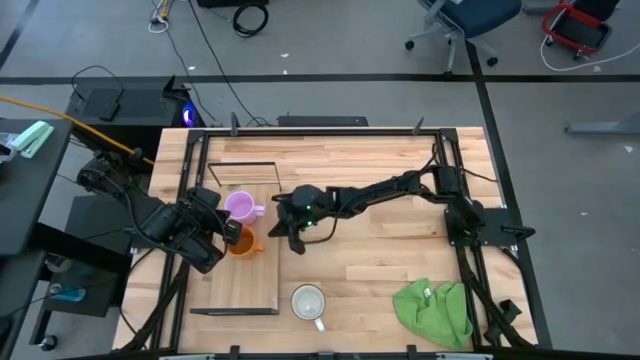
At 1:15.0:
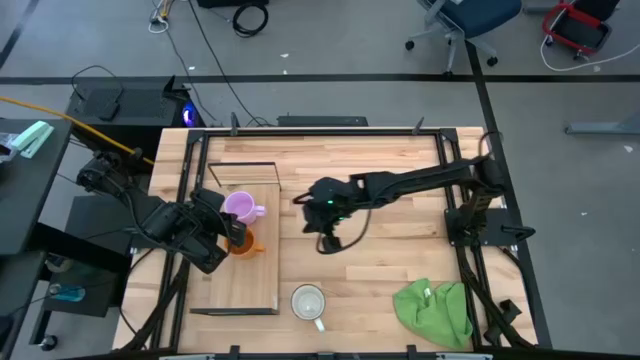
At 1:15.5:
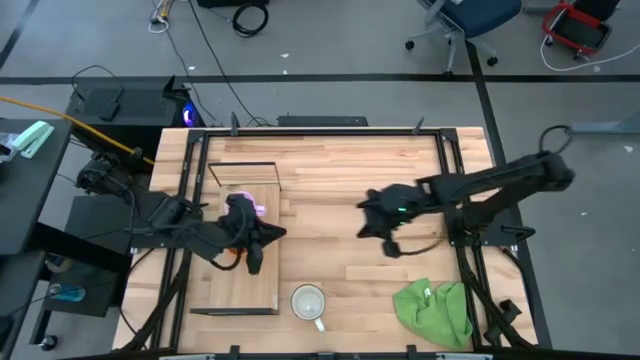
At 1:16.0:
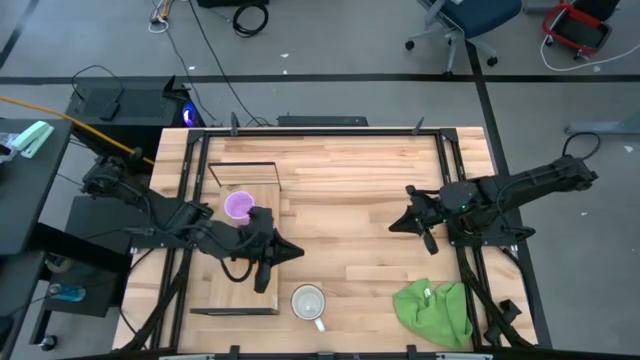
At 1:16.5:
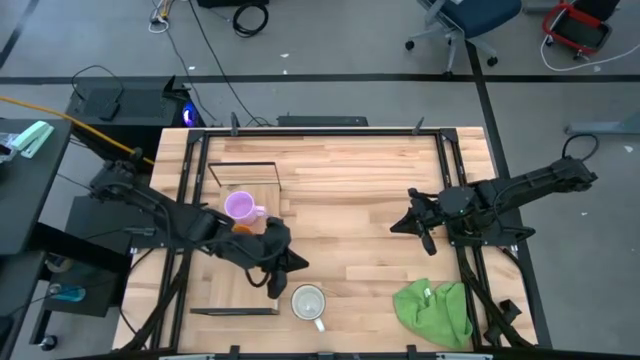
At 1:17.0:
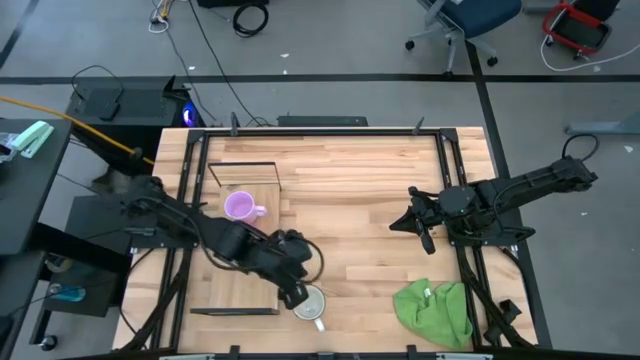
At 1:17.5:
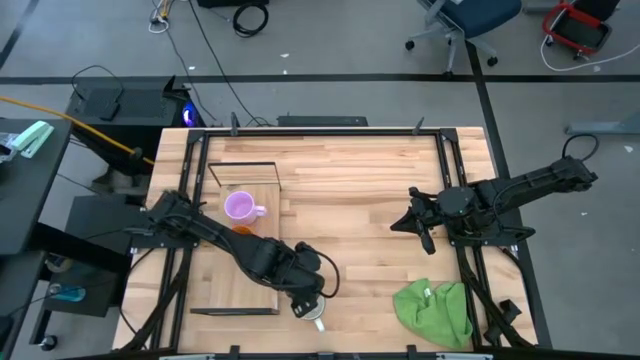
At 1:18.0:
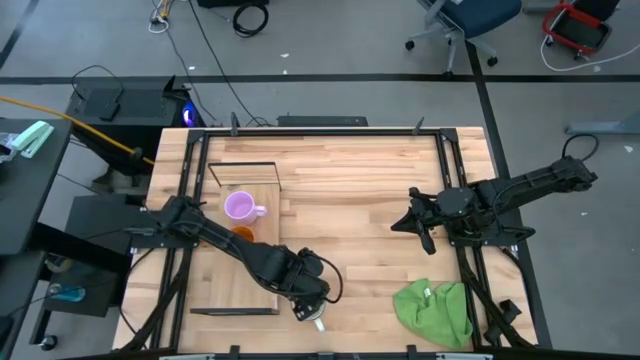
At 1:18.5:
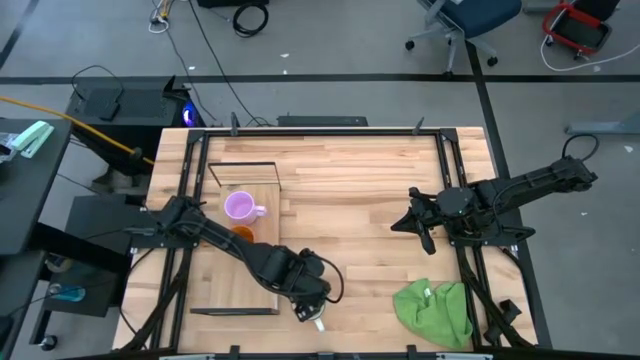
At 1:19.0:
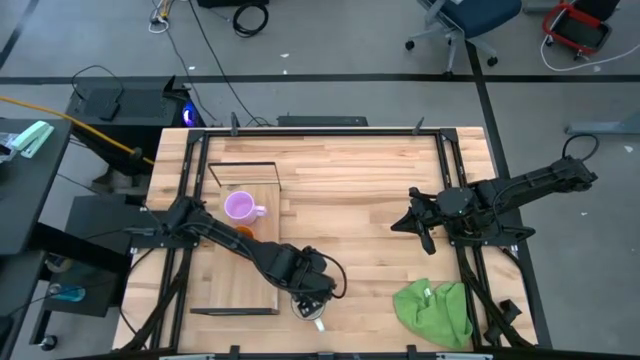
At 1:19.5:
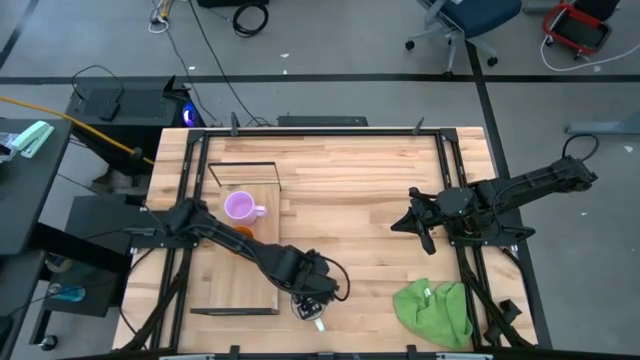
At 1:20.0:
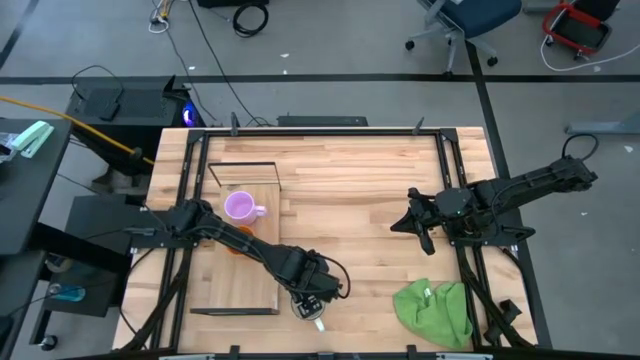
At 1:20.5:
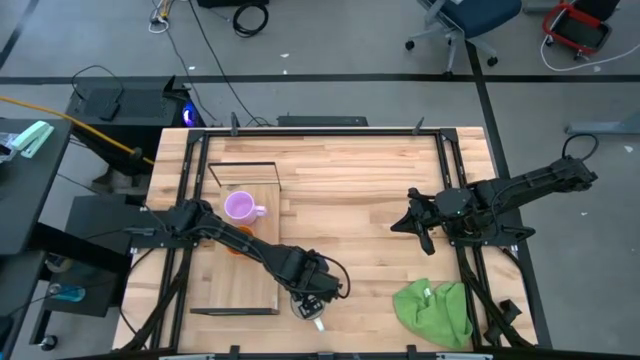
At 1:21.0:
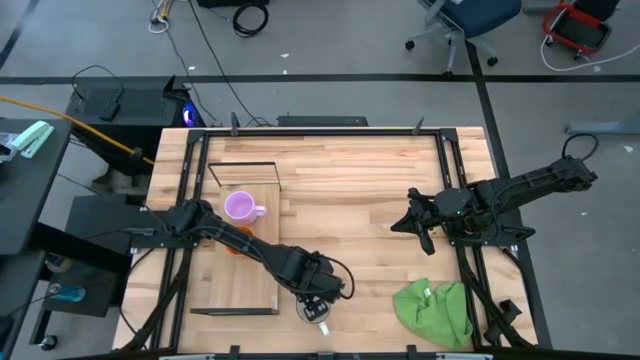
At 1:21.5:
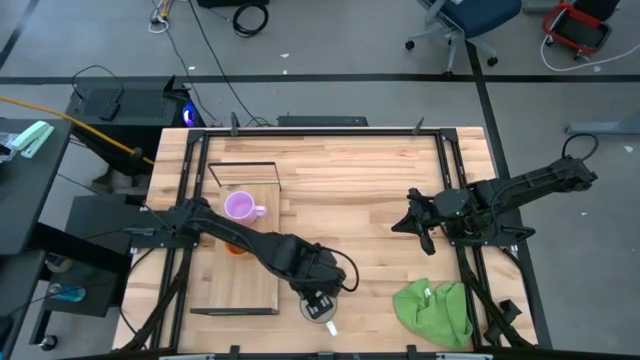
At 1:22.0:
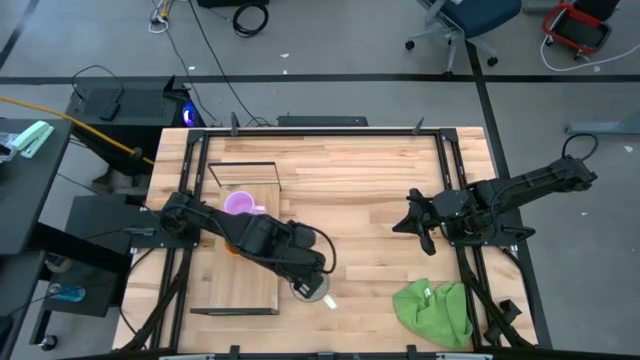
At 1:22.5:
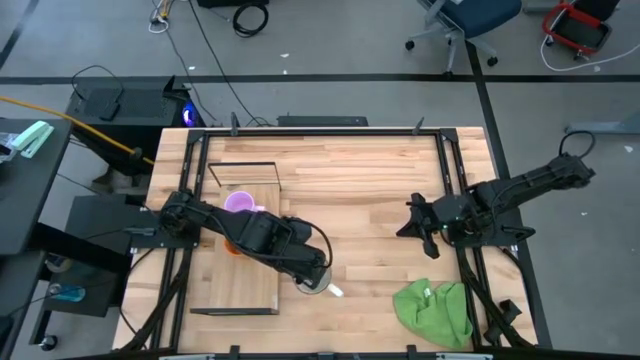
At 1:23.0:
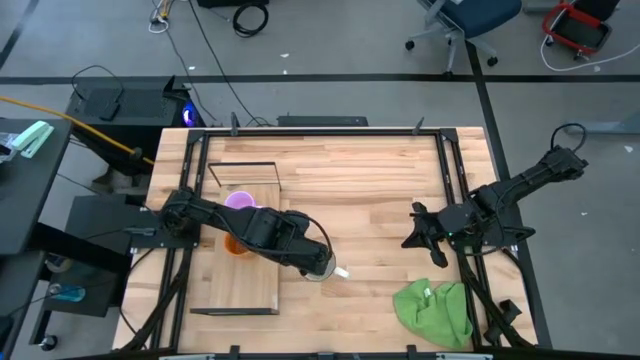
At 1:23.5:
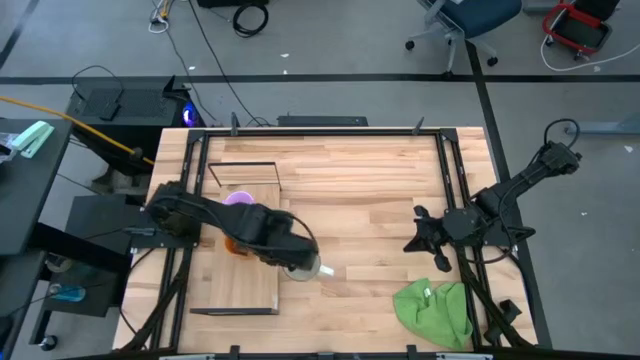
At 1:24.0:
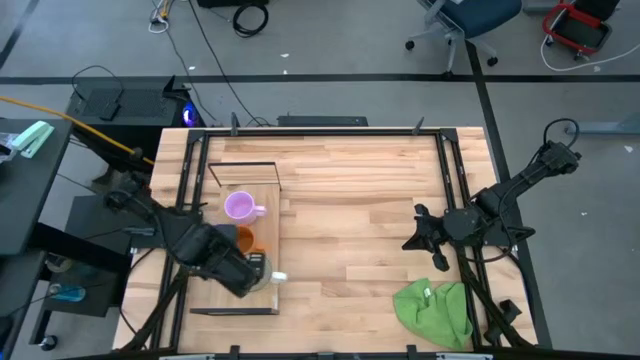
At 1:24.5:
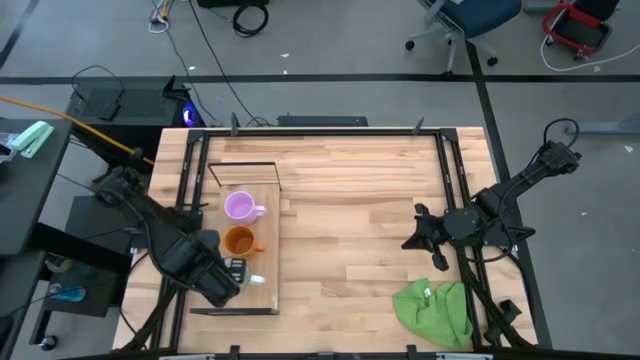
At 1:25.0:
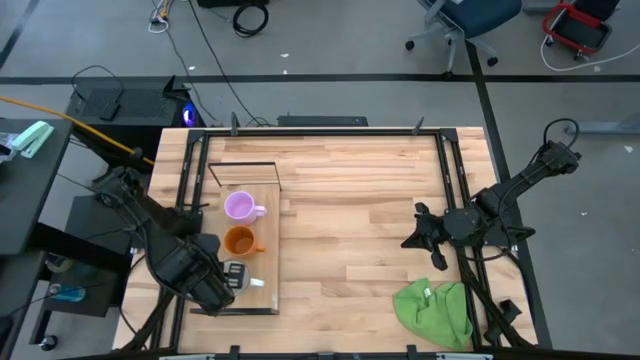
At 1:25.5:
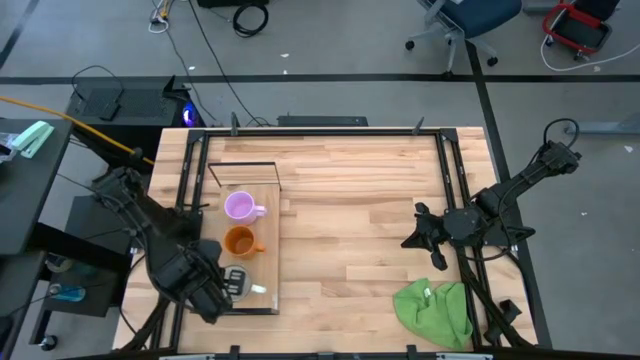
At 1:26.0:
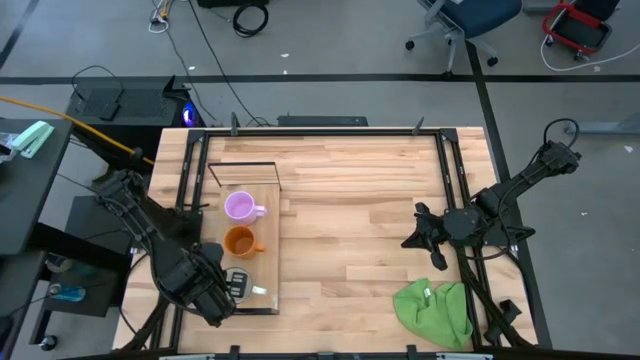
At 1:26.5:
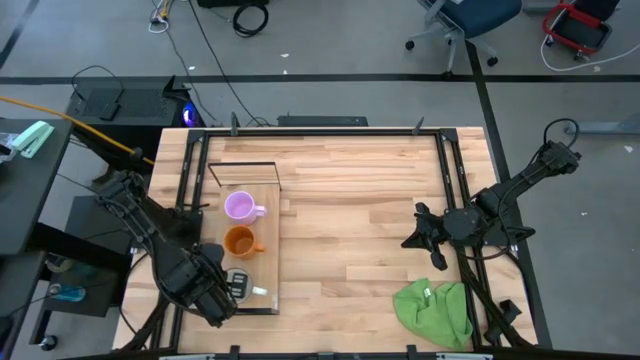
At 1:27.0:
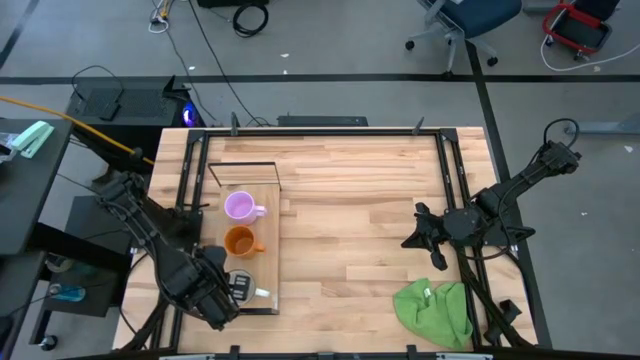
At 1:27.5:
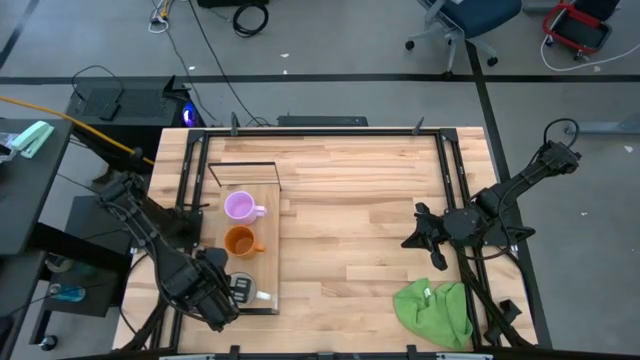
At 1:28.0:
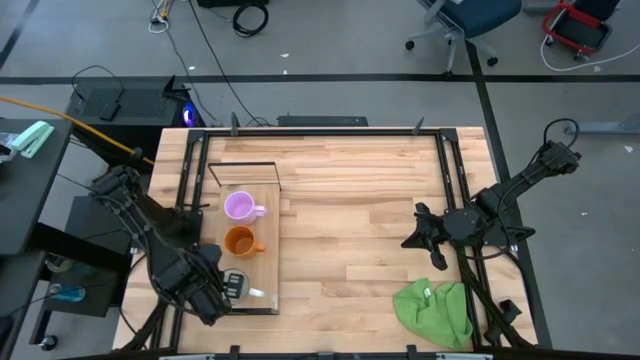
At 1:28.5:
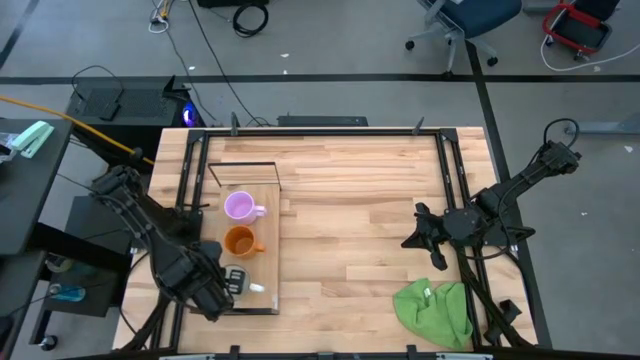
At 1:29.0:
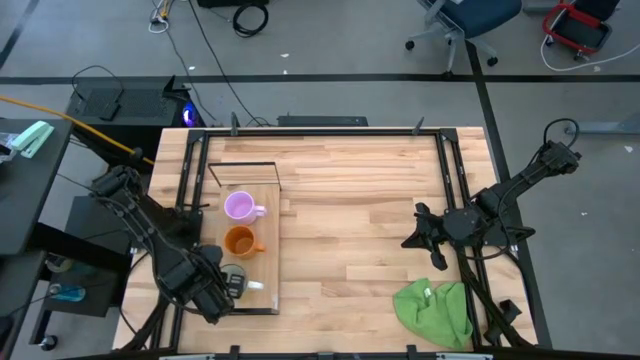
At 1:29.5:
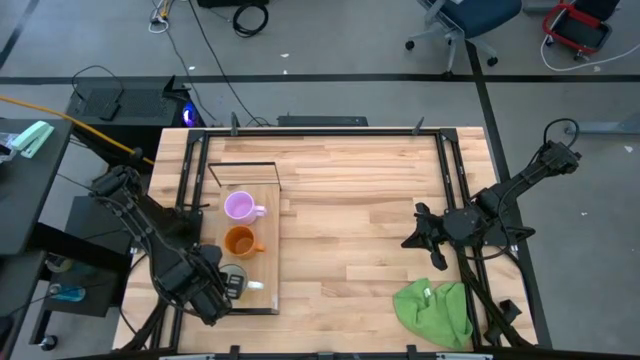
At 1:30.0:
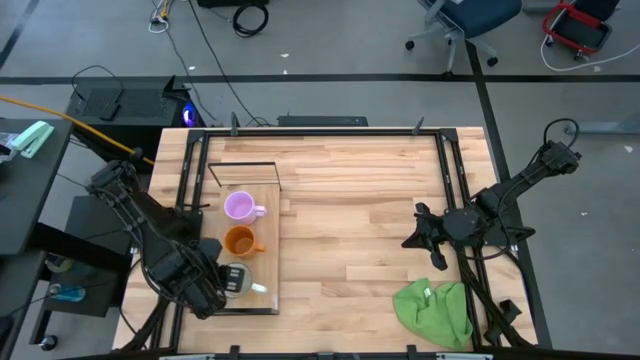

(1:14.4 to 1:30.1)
Task: Stack small to large cups/mugs on shelf
Put the yellow mug on the shelf

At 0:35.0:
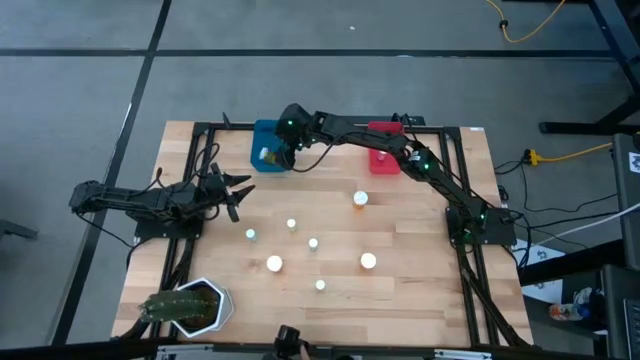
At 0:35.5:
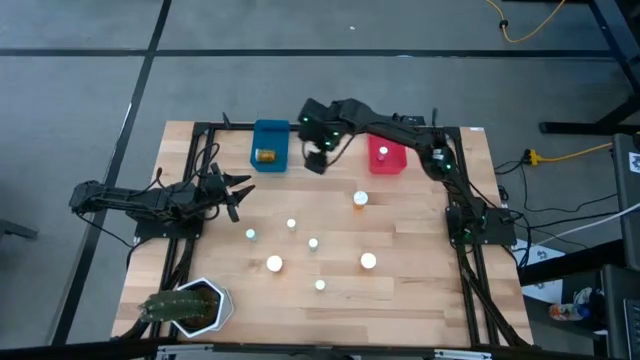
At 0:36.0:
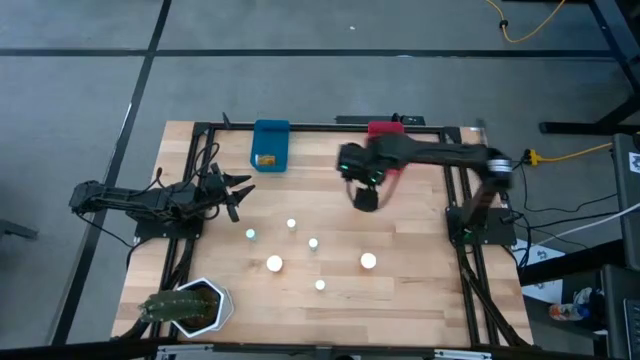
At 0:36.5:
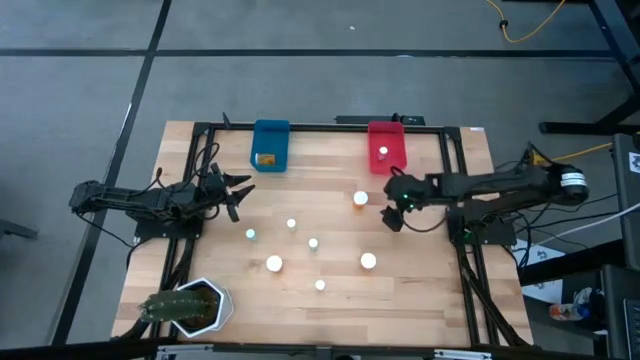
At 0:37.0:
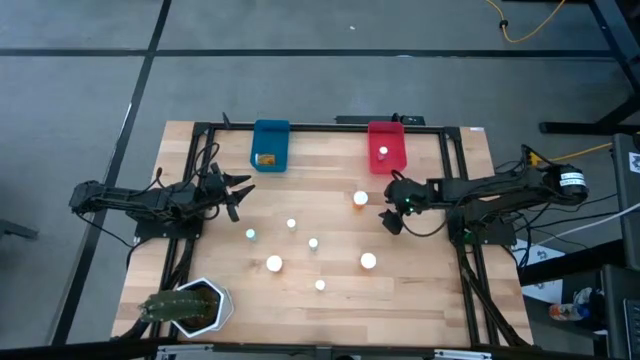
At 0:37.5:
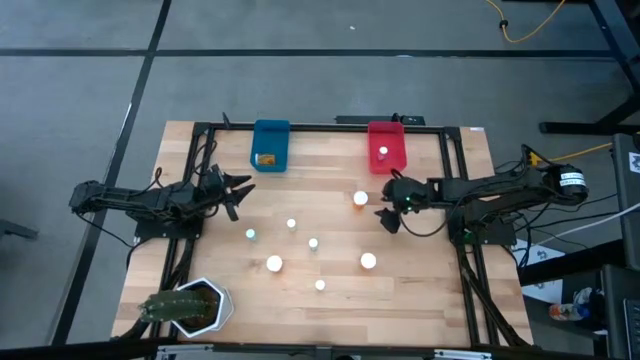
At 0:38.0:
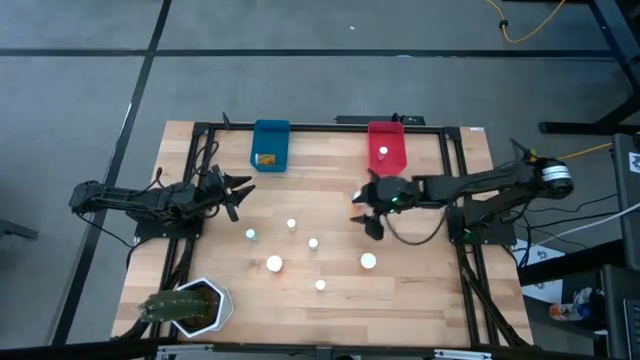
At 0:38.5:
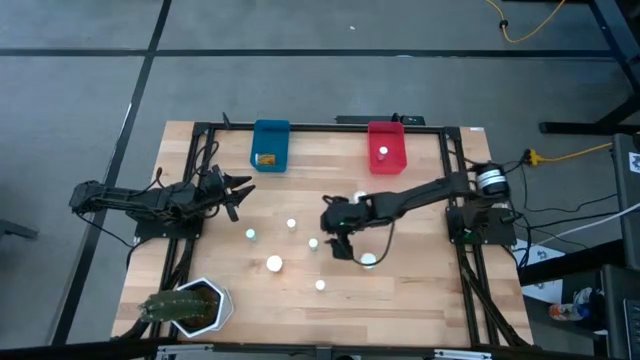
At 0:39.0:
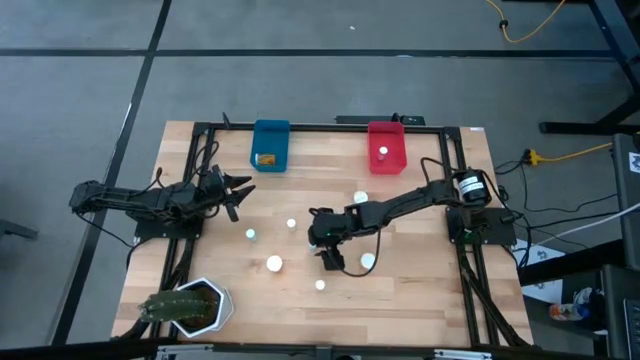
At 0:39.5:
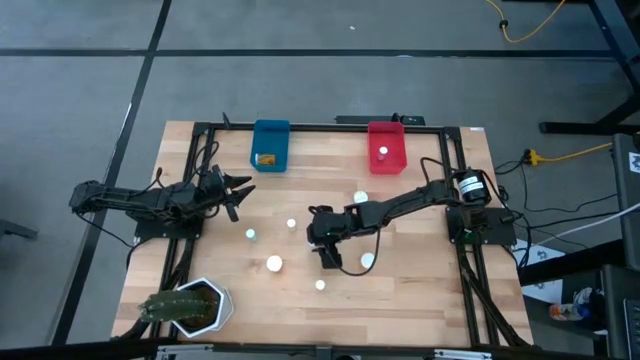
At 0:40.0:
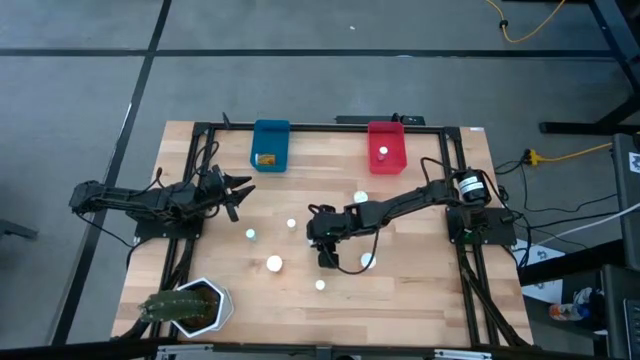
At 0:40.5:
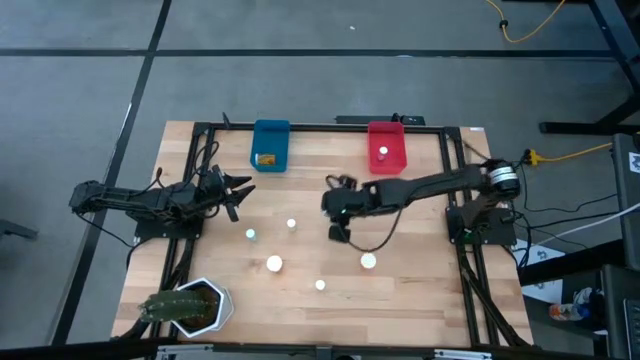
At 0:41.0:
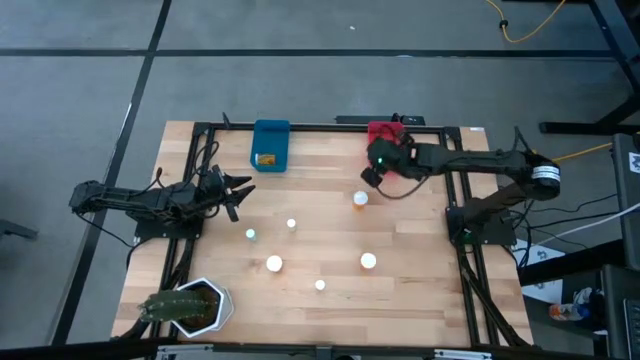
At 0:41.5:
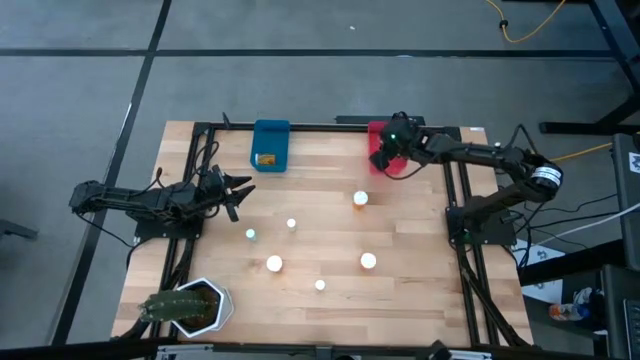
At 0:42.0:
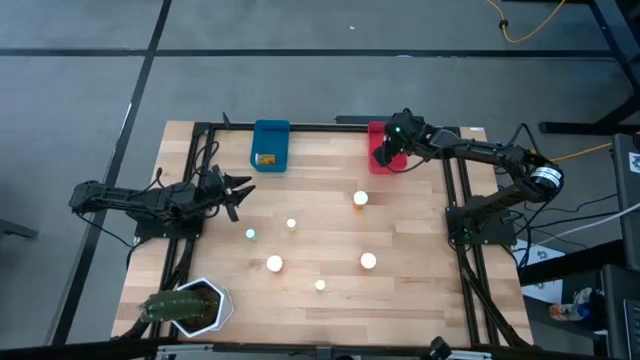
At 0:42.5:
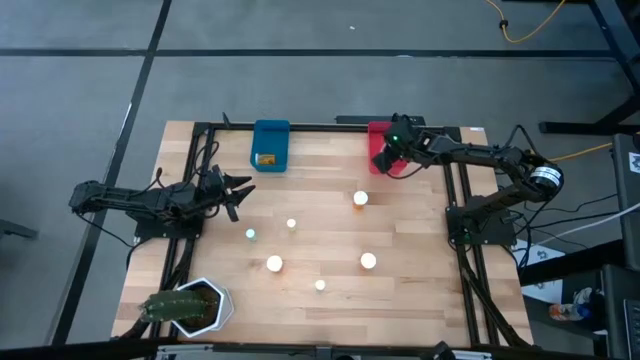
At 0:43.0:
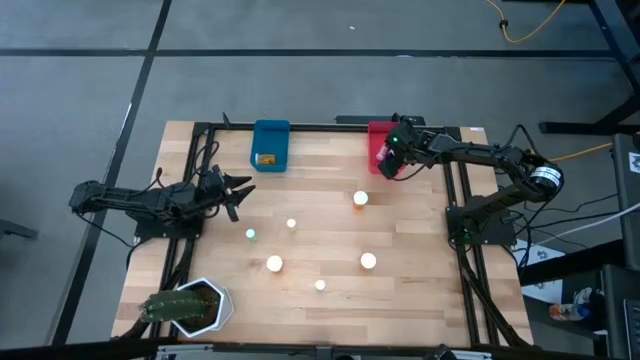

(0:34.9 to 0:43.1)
Task: Pick and place medicine bottles into bin by pill shape (circle, oval)
Put the small blue pill bottle into the red bin
